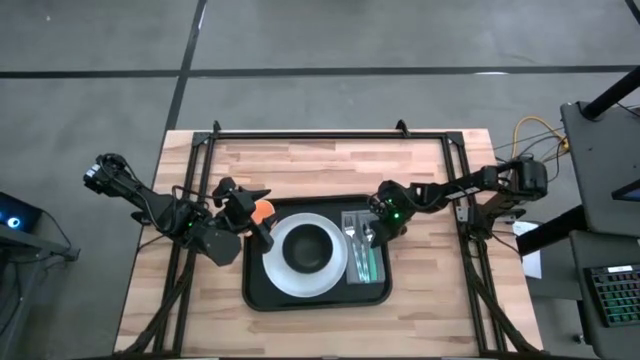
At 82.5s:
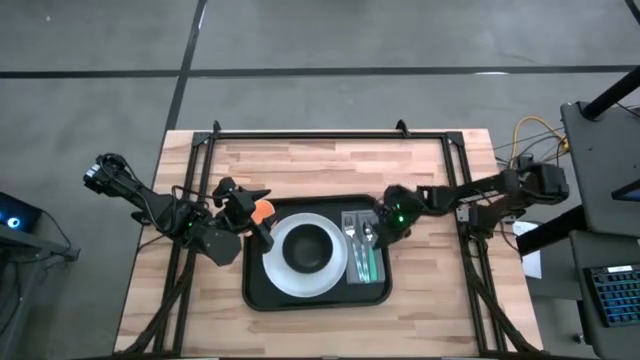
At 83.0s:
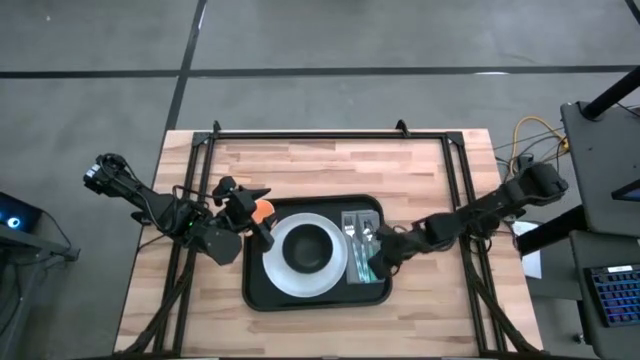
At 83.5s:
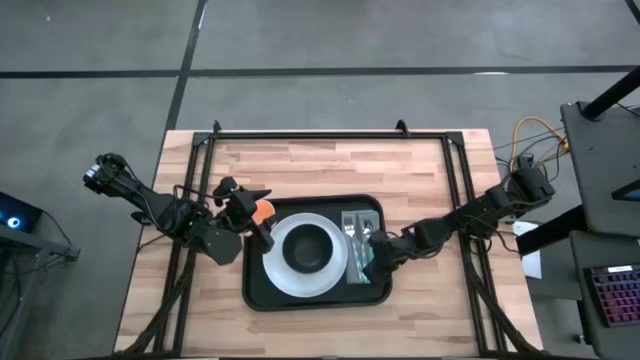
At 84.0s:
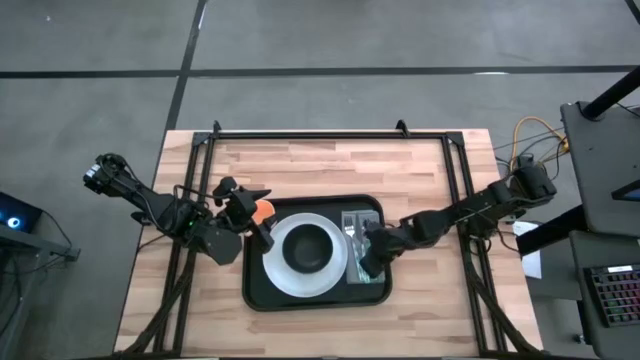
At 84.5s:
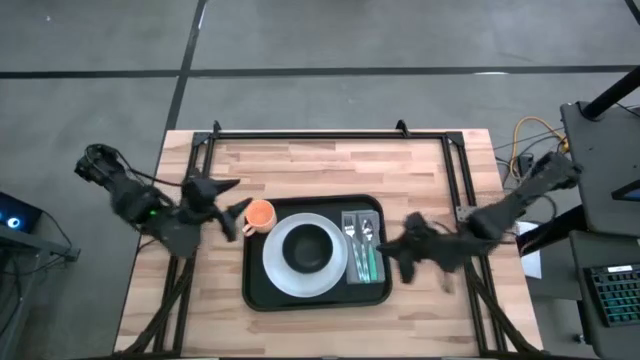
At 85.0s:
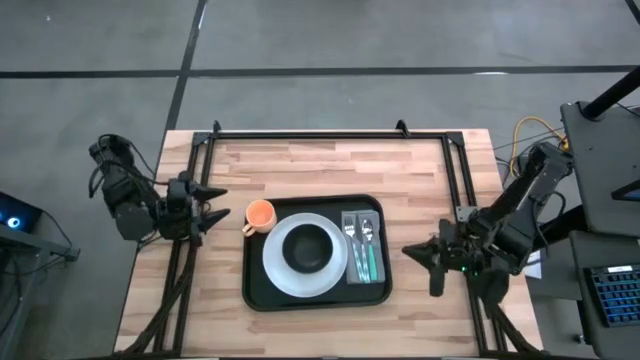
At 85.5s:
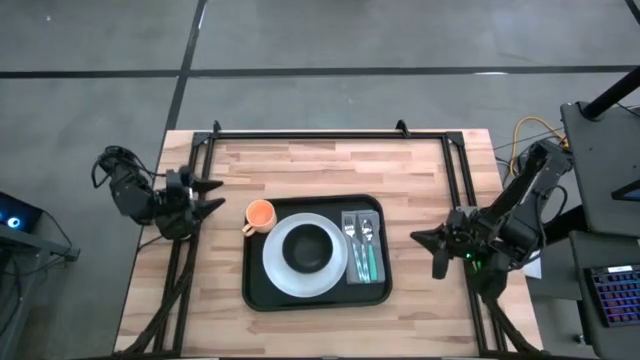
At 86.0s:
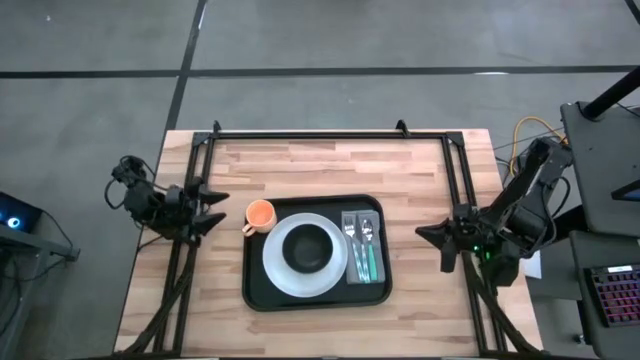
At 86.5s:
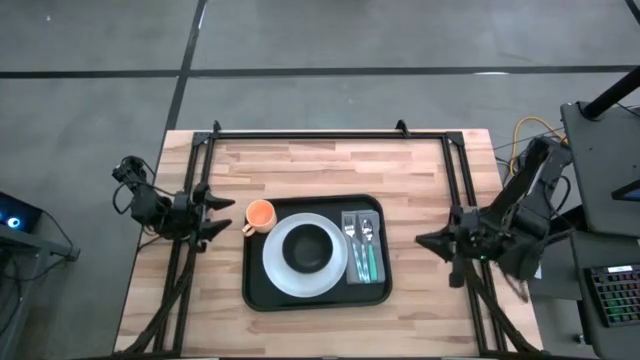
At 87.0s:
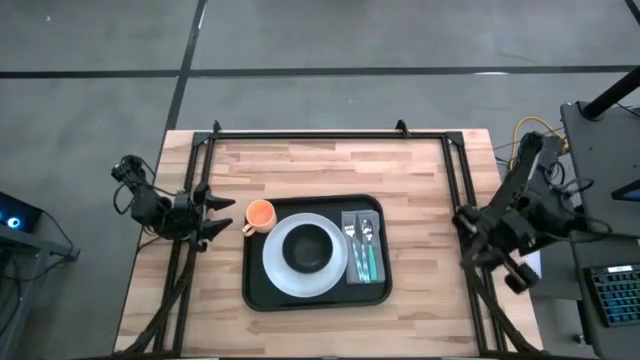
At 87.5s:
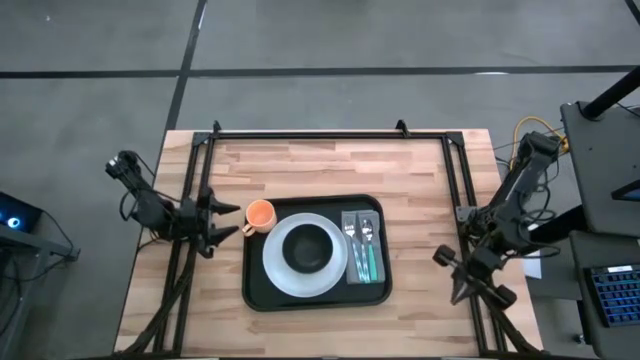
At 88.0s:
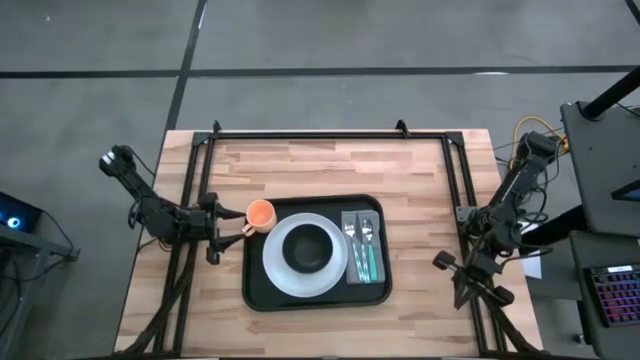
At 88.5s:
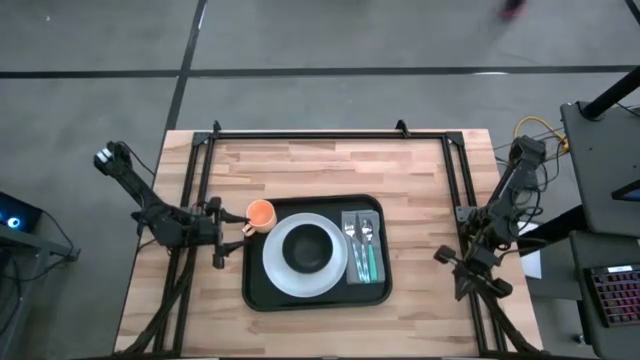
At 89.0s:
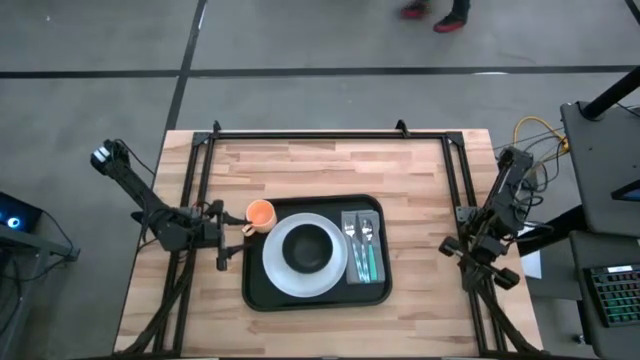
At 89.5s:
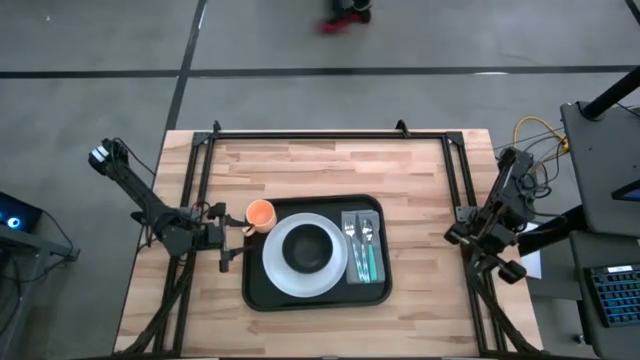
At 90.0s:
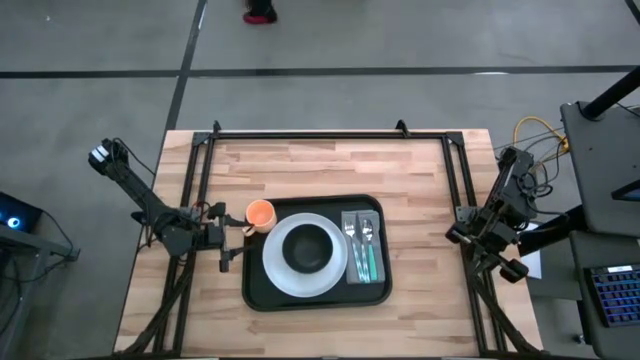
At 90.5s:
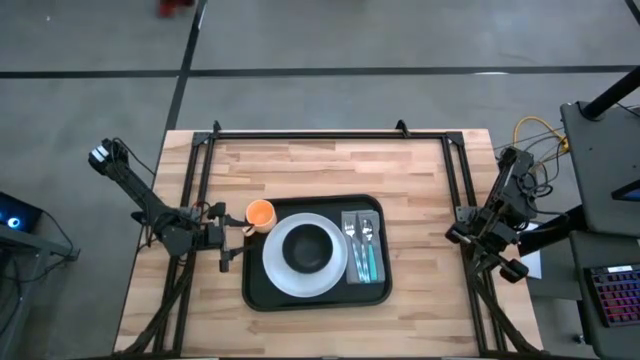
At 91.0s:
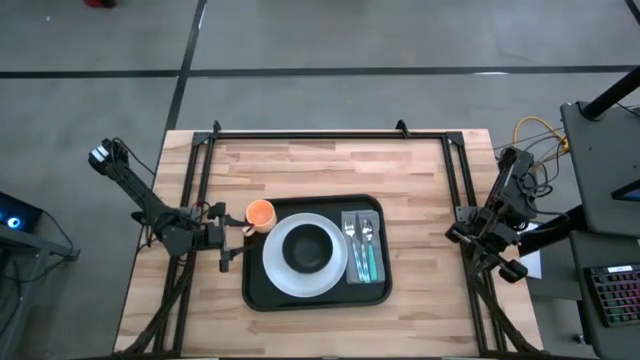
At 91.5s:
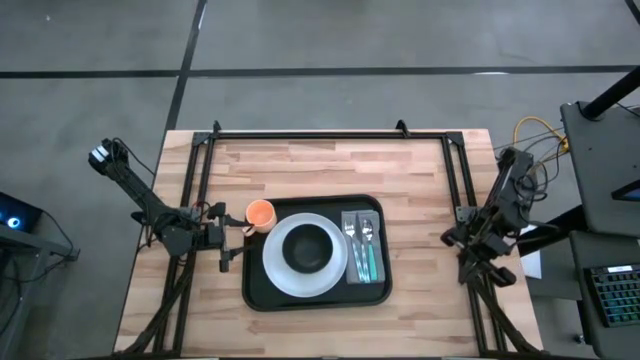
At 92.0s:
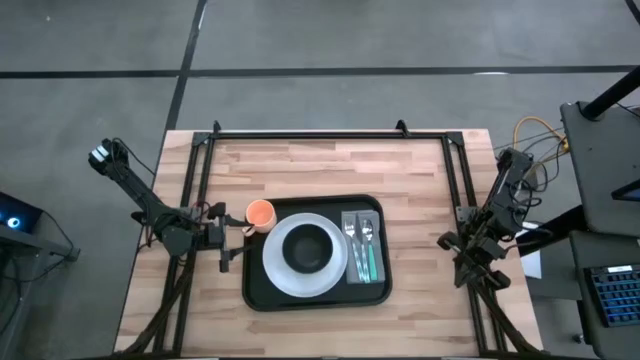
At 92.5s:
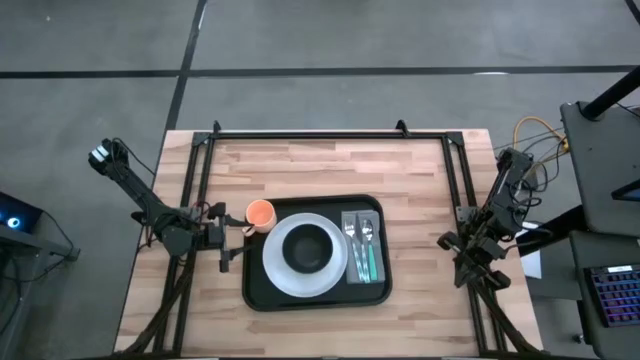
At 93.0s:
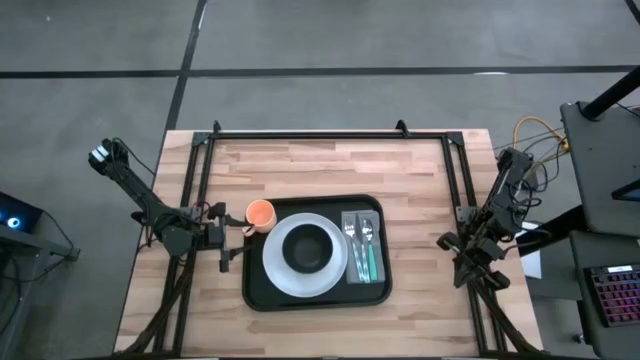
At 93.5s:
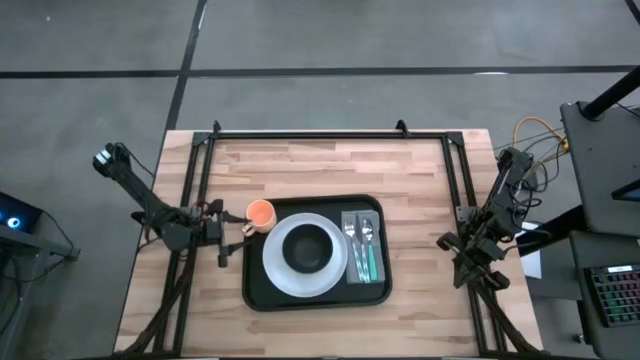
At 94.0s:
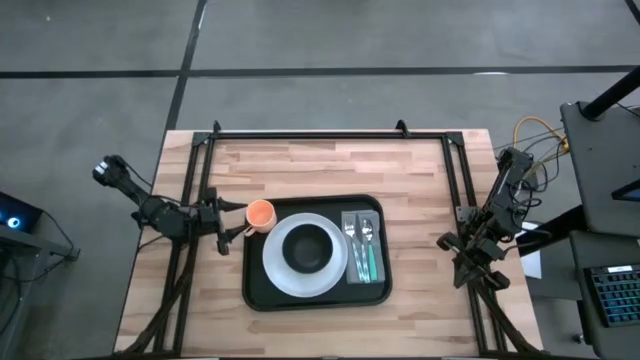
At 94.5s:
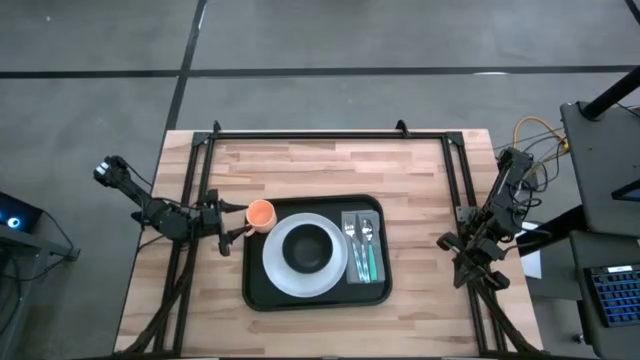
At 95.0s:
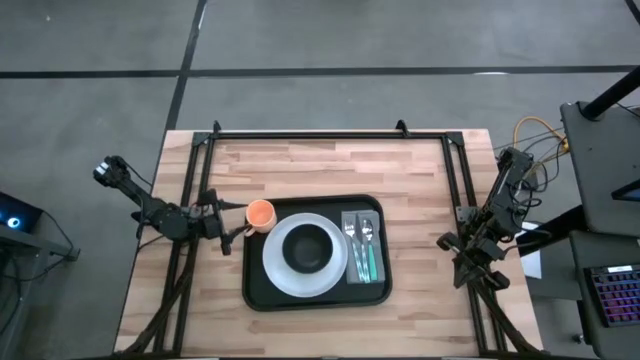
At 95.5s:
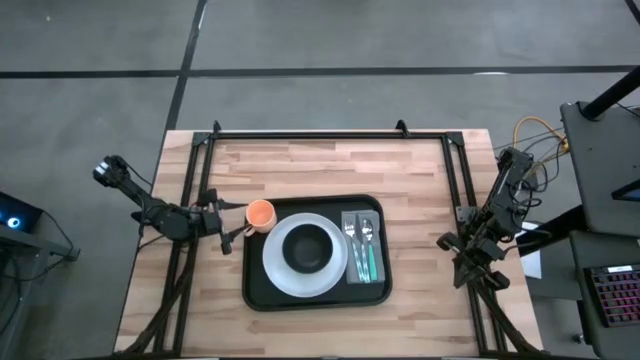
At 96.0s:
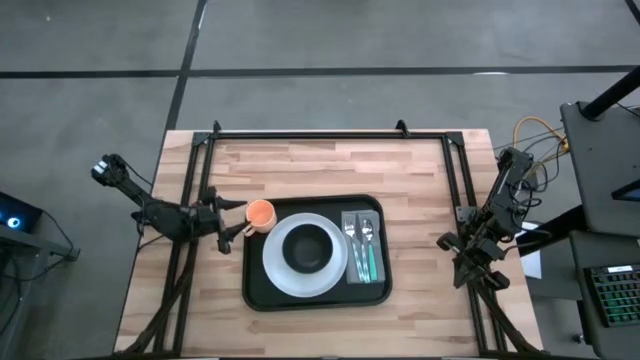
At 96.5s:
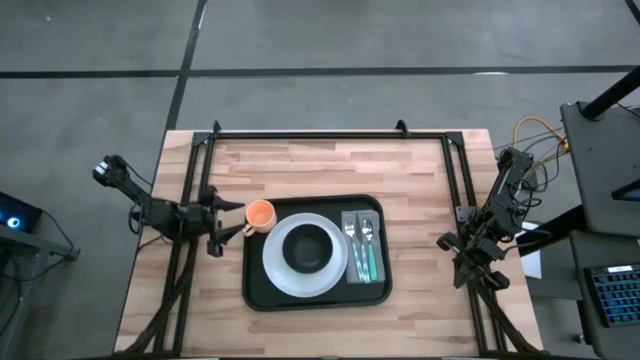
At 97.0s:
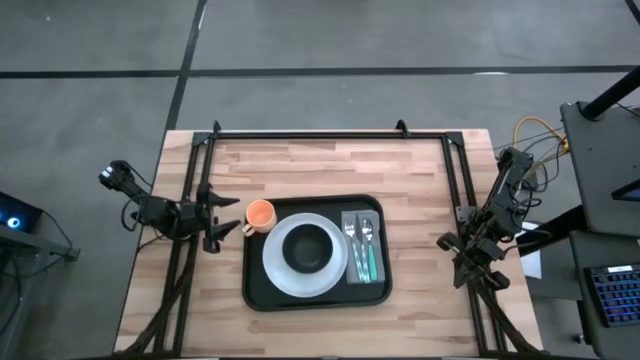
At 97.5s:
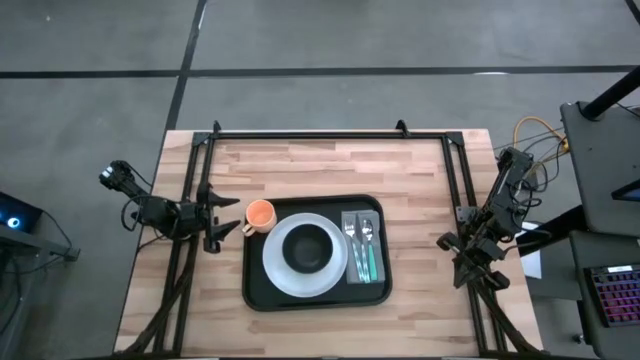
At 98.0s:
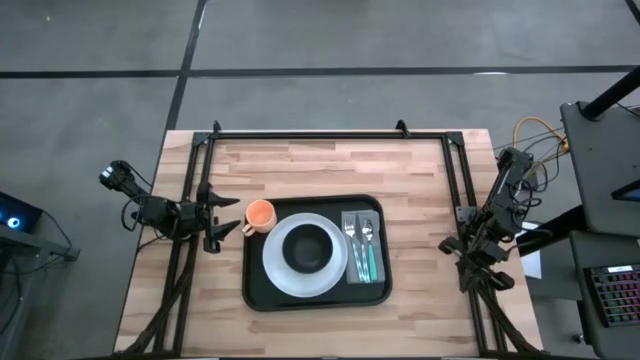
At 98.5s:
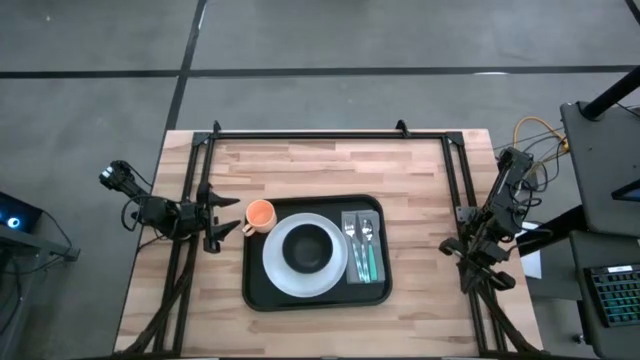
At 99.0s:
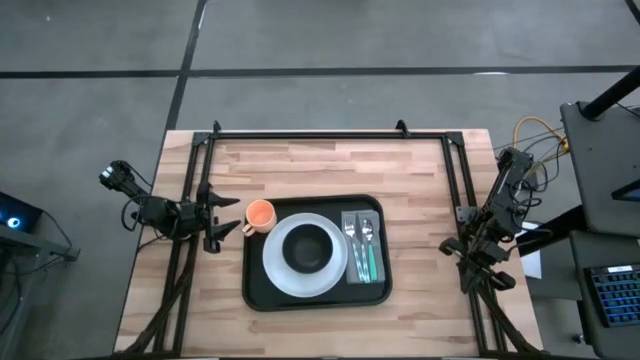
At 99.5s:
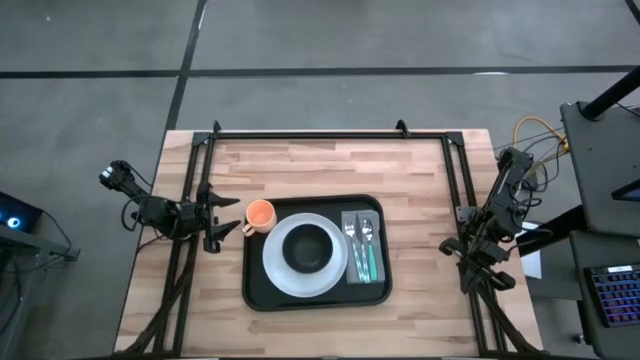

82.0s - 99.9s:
Task: Set up tray
Return to Home Position

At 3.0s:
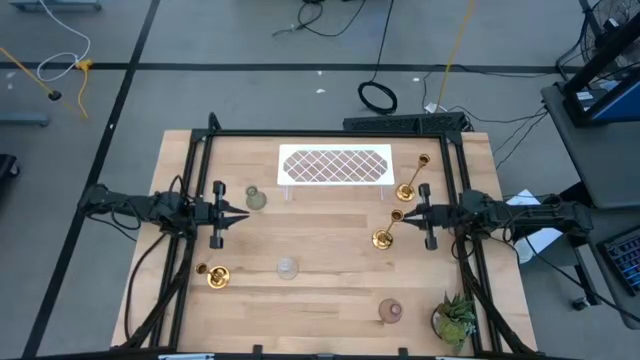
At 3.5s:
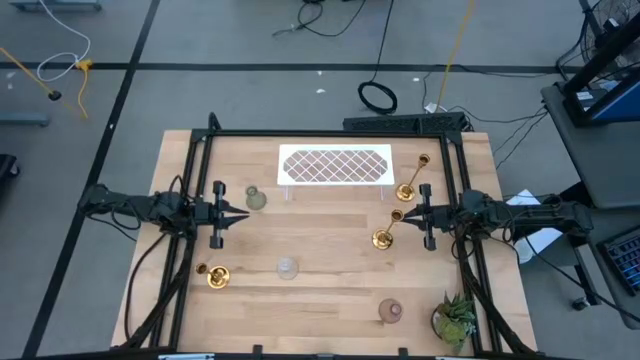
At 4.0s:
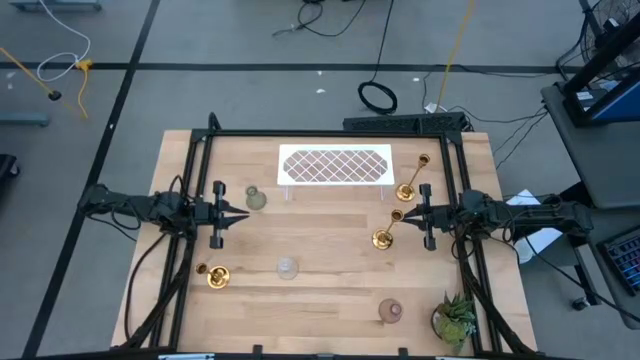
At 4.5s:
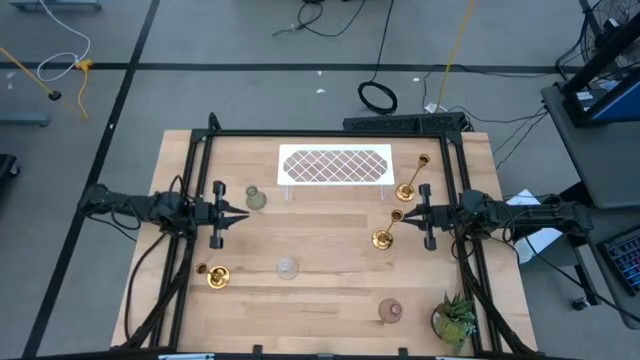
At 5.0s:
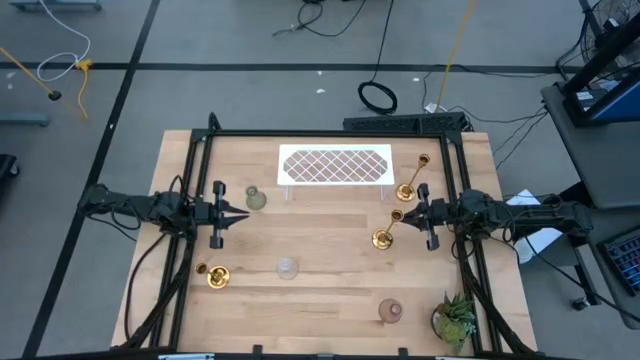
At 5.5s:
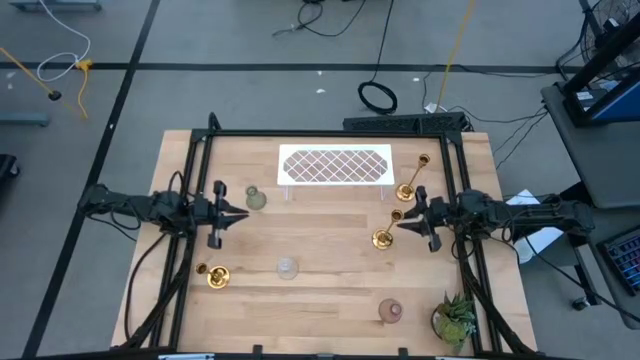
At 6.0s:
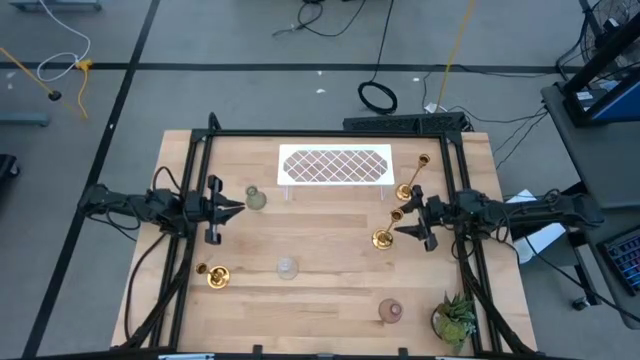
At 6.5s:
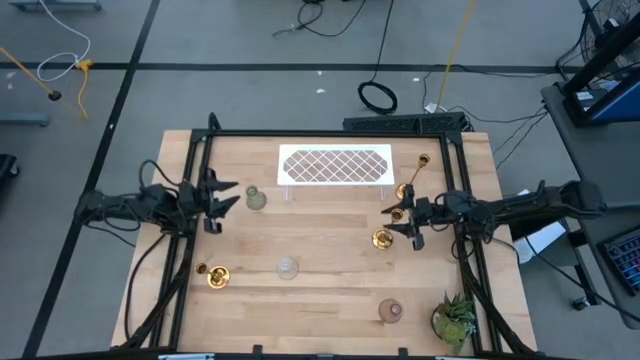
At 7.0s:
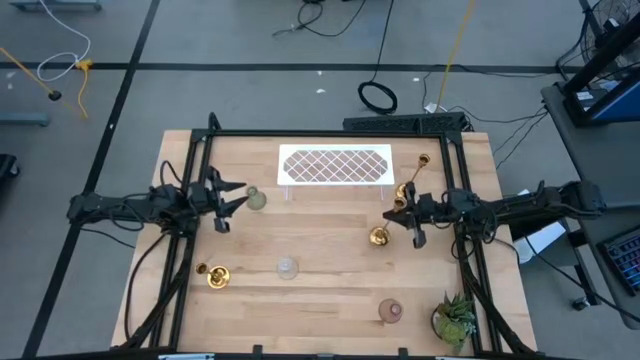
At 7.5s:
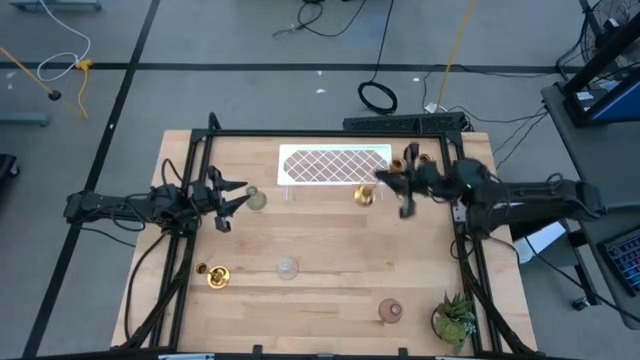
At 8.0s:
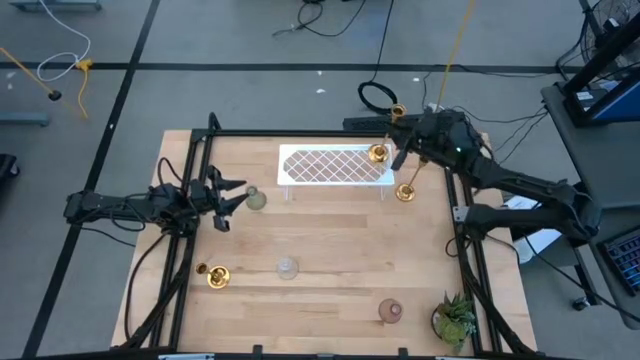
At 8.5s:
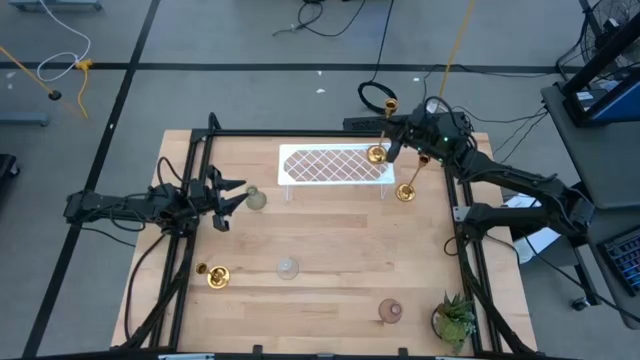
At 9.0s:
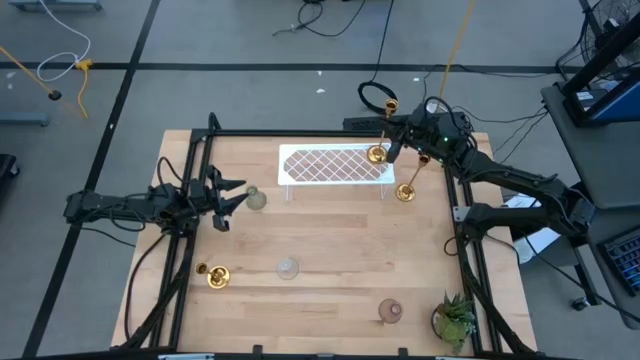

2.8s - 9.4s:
Task: Pick & Place candle stick holders
Put the middle right gold candle holder on the shelf
